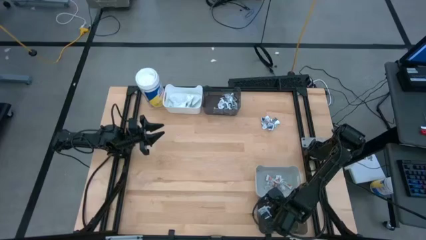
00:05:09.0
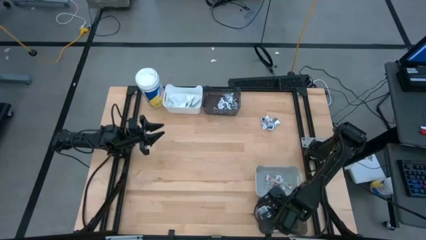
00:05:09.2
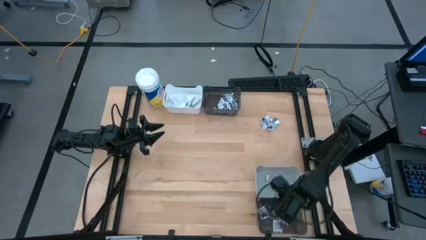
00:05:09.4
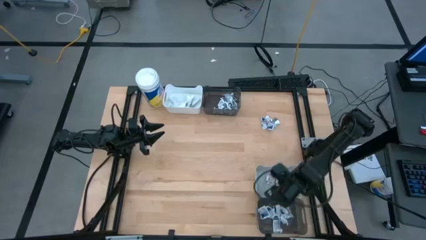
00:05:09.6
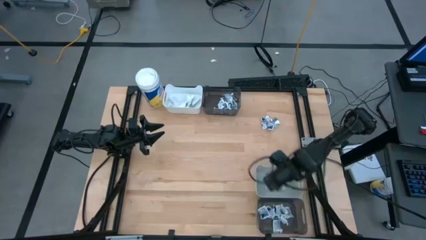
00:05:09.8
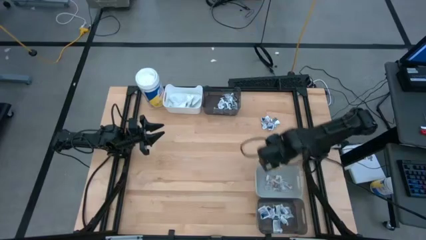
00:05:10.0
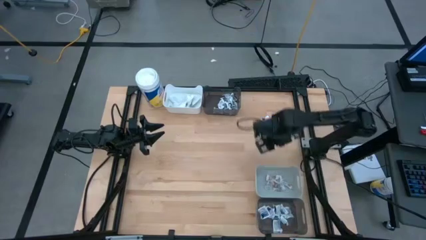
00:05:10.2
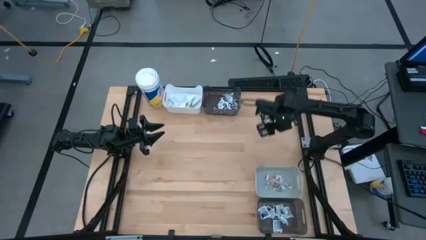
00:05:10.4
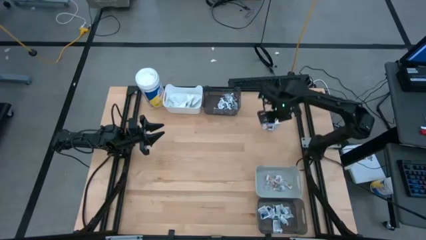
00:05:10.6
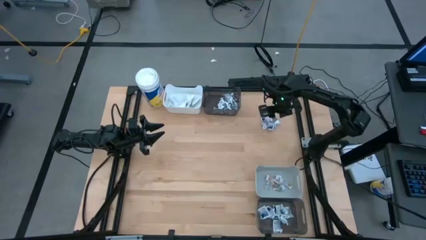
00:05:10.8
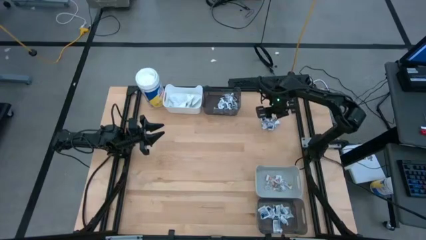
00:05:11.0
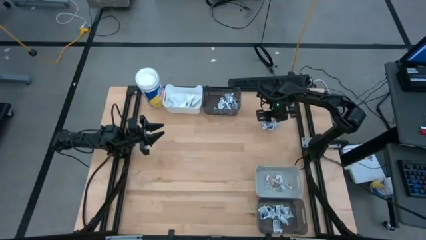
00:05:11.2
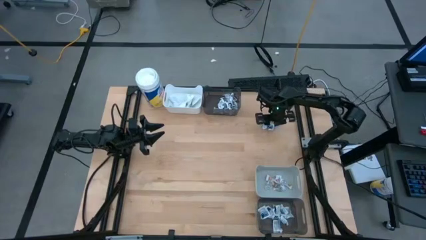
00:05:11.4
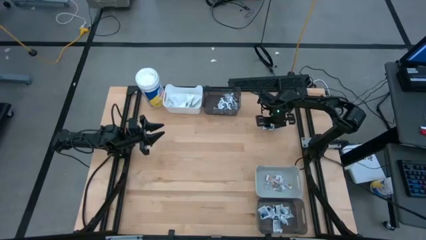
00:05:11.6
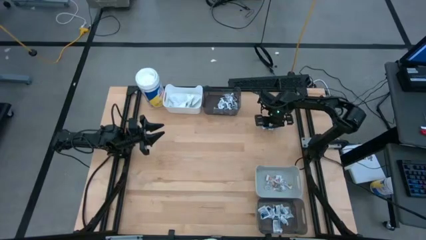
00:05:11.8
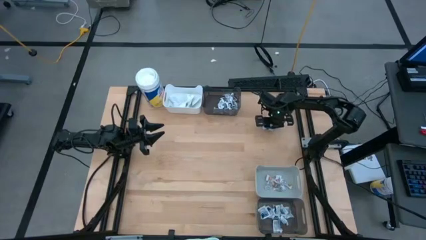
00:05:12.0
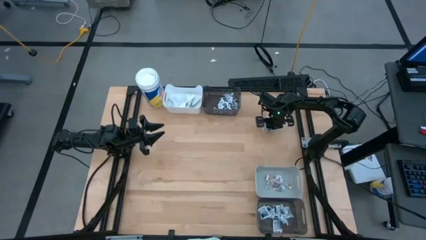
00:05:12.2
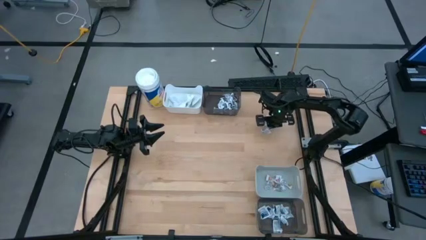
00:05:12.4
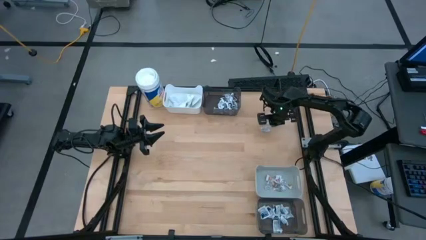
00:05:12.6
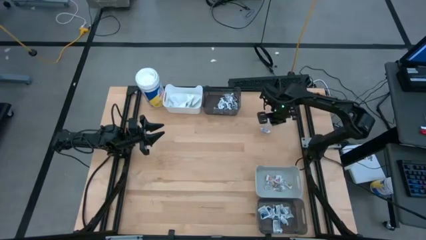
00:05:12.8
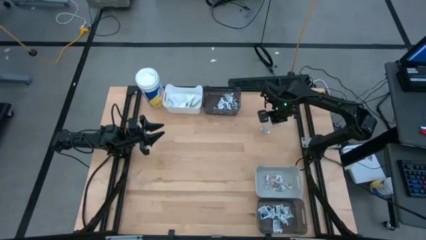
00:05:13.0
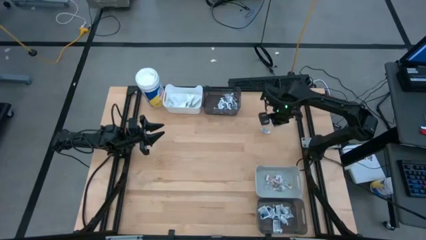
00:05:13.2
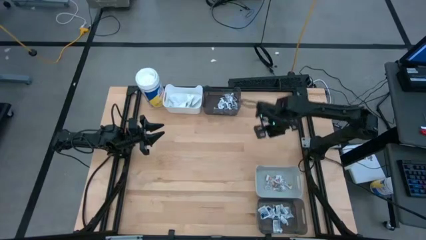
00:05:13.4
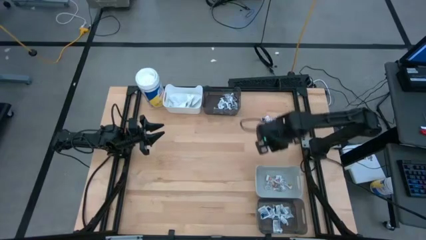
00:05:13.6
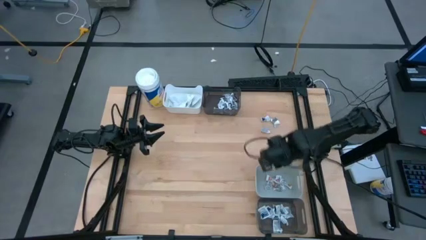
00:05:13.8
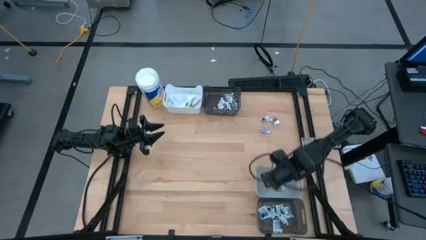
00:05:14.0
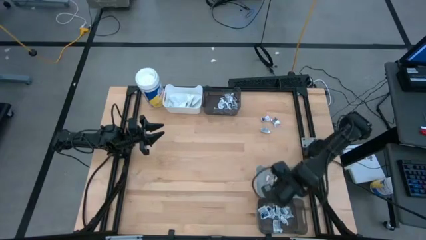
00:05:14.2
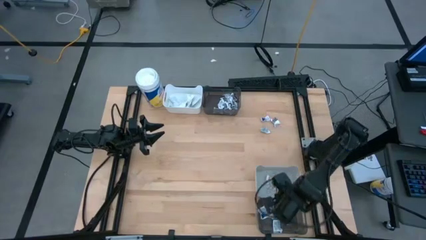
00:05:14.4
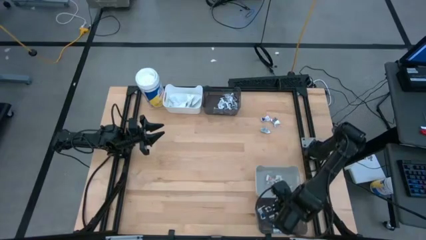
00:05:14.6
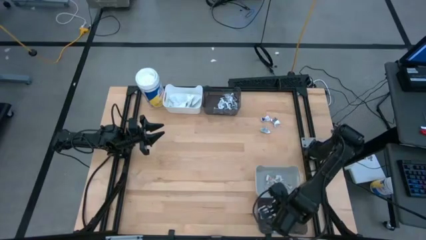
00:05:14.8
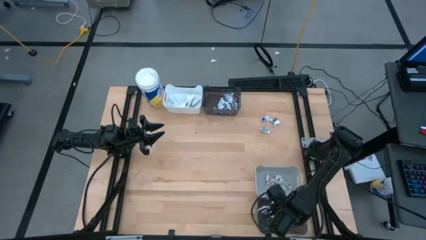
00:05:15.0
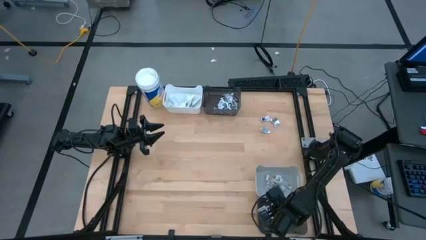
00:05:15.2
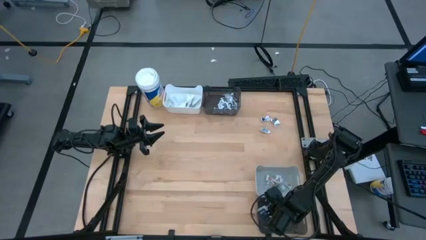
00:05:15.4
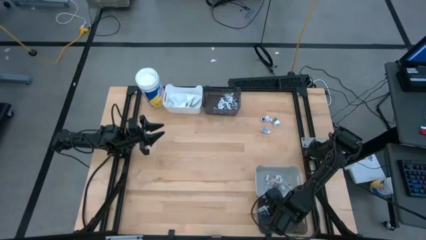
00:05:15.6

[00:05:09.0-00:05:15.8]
Task: Pick & Place First Aid Supplies
Put the blue alcohol pad into the bottom black bin

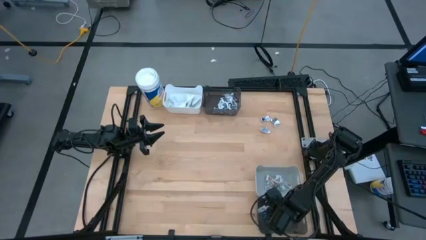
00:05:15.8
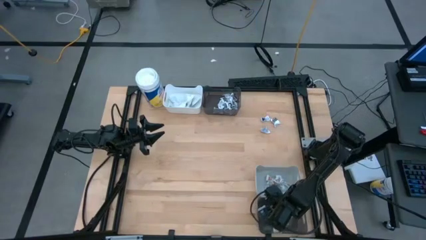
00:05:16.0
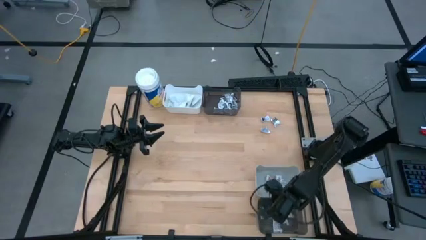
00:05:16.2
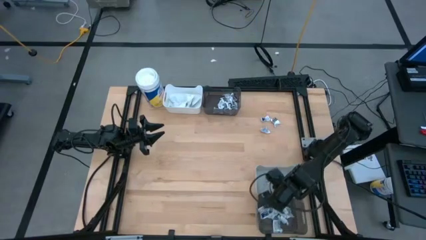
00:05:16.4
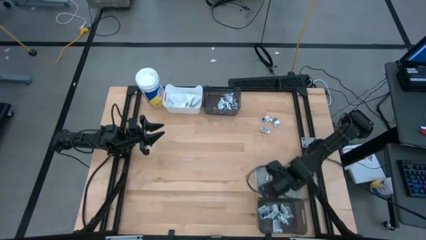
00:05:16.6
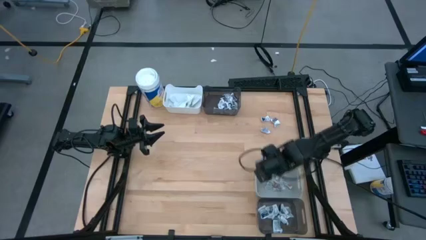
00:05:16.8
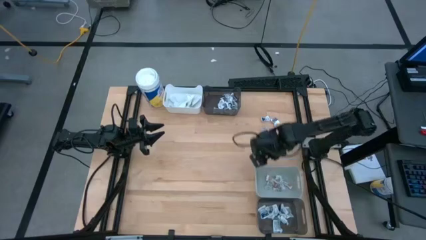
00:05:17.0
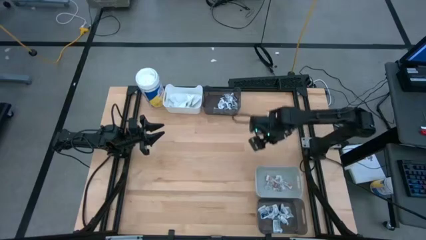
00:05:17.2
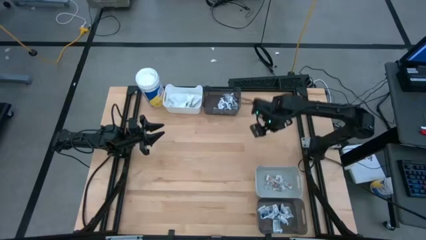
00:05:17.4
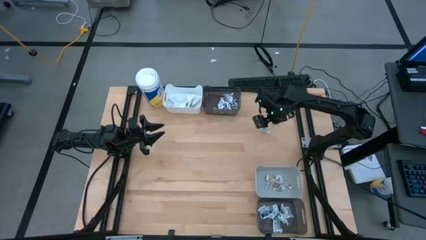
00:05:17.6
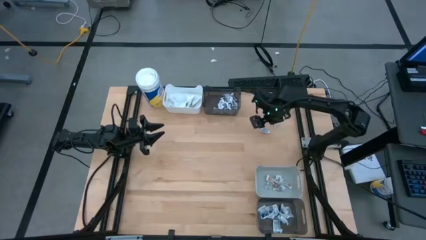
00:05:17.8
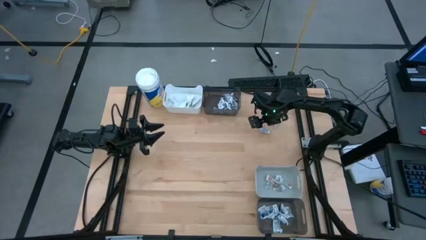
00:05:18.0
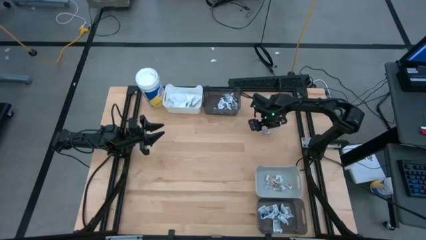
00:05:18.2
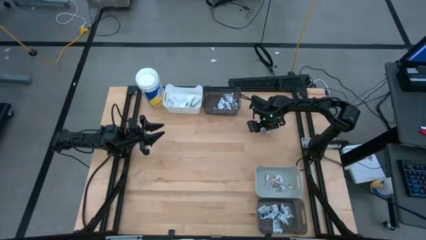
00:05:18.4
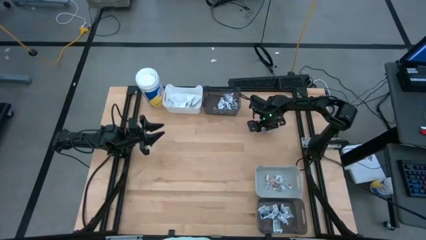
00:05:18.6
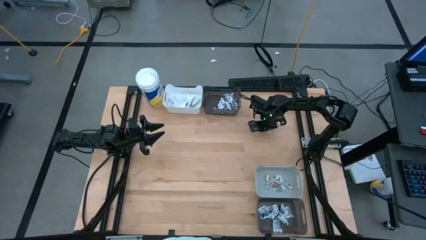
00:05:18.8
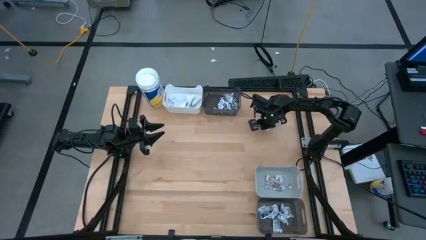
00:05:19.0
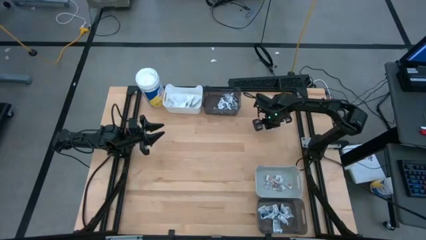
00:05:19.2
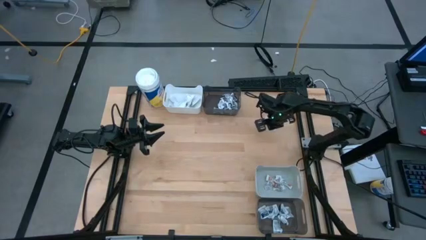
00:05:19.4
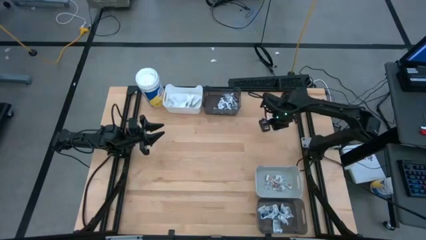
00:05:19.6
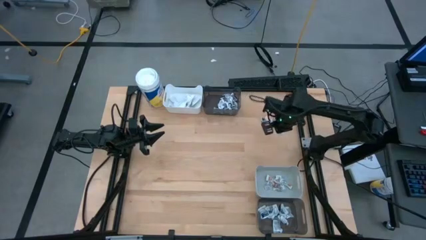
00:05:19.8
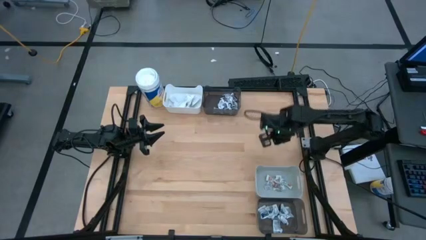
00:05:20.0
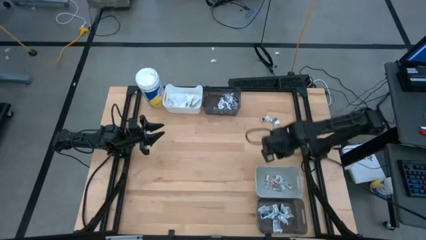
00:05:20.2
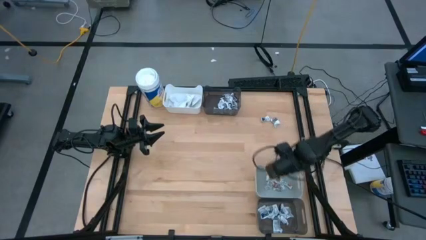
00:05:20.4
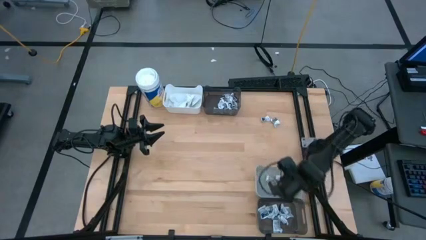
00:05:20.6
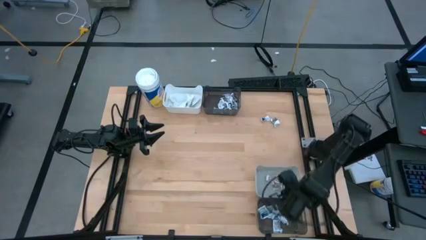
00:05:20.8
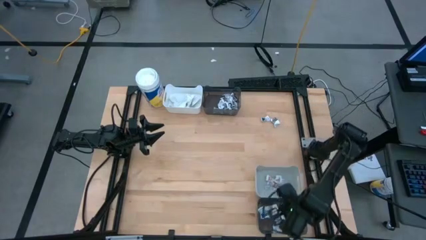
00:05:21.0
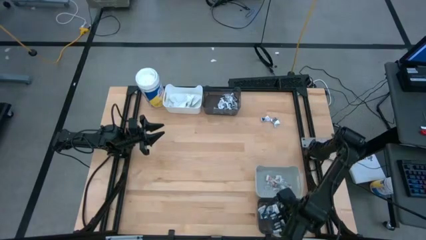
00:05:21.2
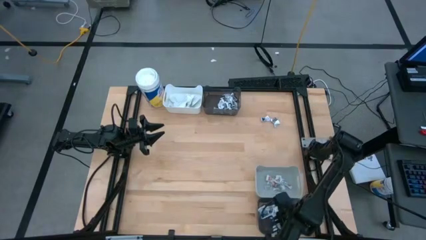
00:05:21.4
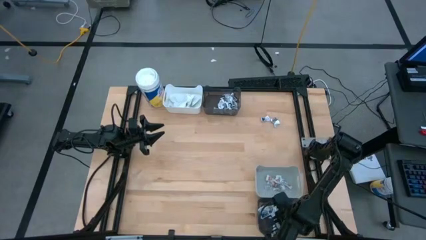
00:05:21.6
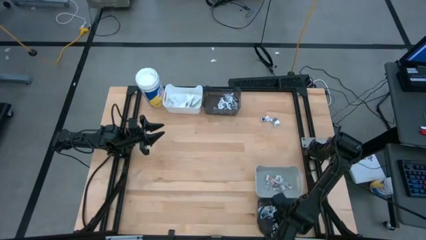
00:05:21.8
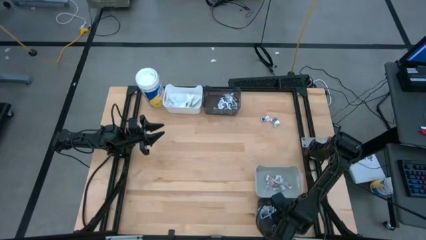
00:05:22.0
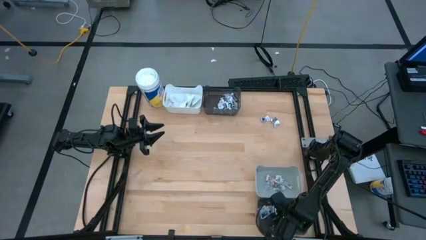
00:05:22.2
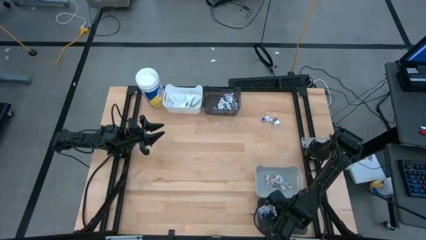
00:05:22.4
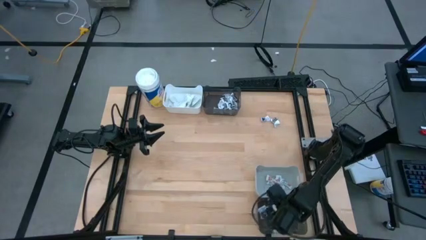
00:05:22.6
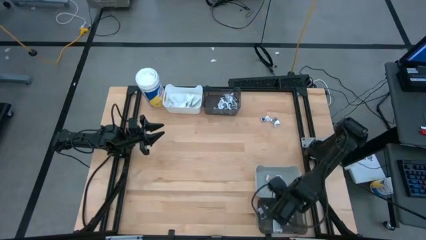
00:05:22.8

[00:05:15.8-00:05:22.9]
Put the blue alcohol pad into the bottom black bin

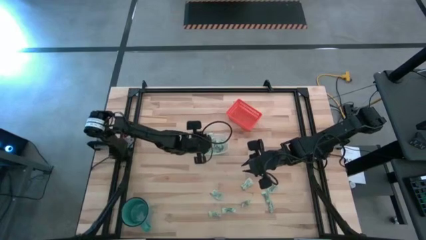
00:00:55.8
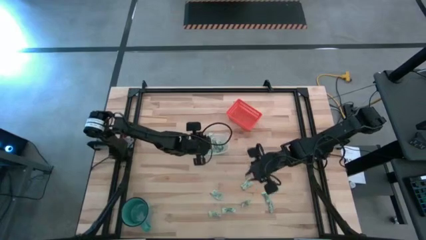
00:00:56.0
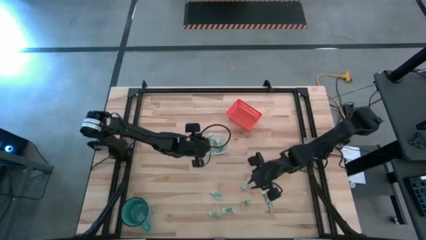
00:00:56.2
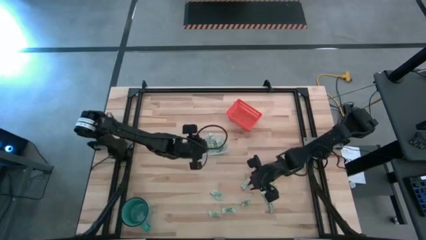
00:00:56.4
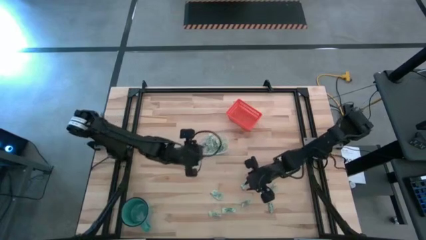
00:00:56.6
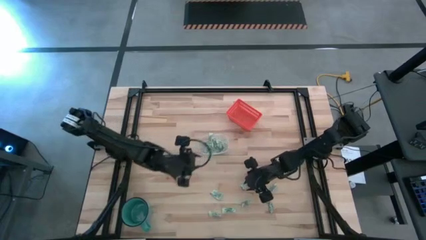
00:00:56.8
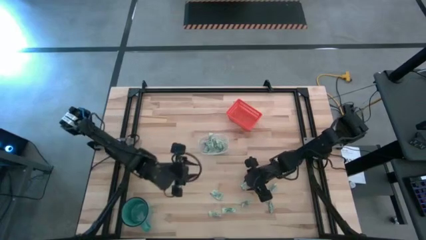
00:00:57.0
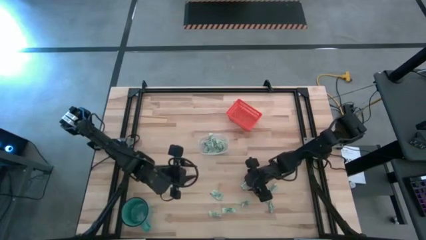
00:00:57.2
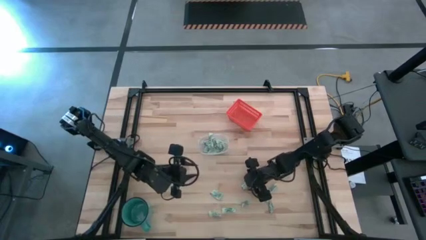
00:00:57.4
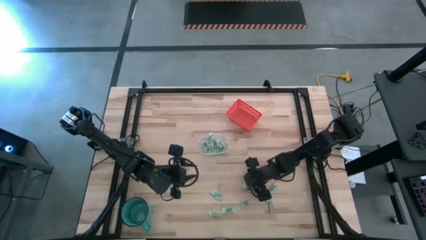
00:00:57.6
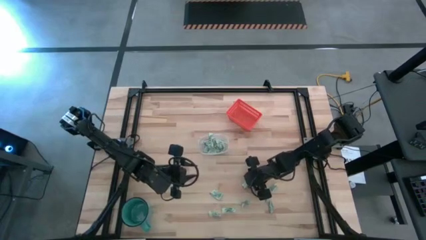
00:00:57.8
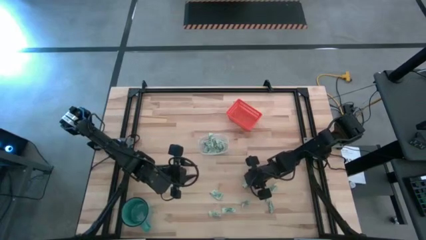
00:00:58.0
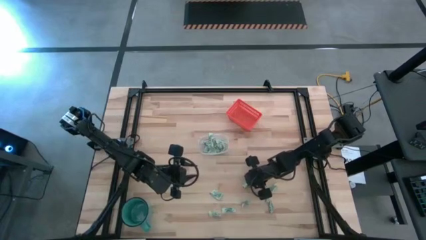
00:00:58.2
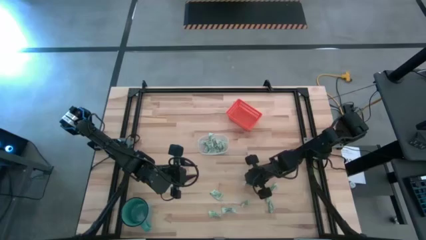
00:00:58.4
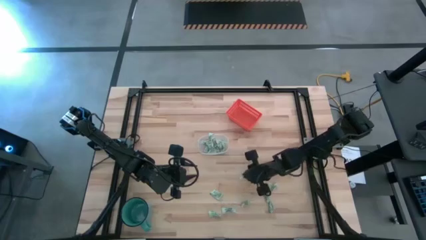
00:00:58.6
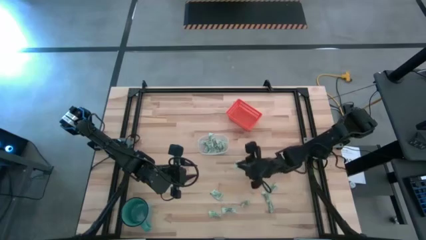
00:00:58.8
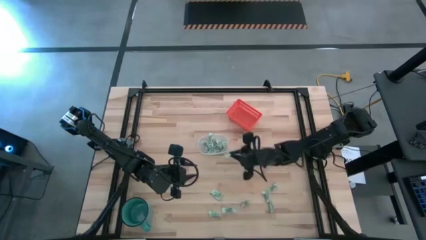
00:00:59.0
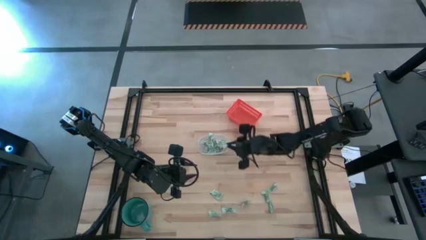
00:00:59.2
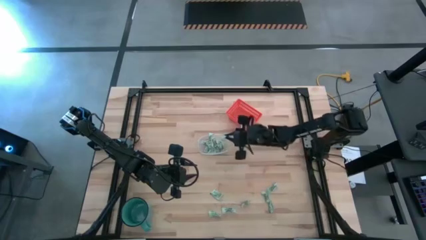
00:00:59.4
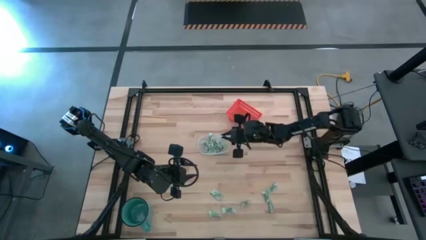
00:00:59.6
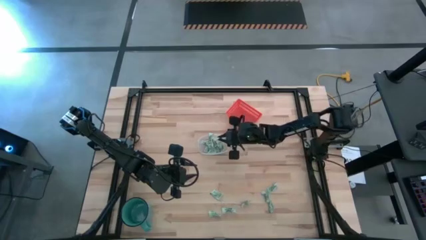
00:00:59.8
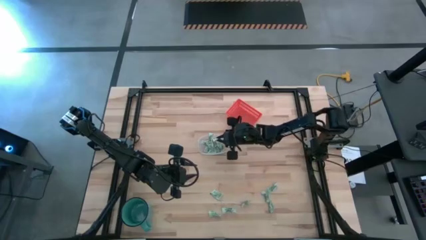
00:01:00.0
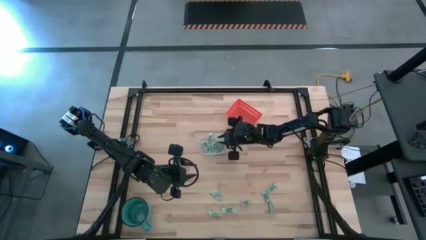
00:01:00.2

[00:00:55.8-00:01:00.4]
Task: Pick and place items into bin
Put the stevia packet into the transparent bin
